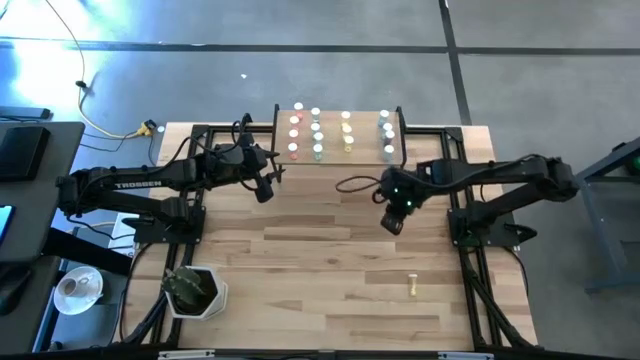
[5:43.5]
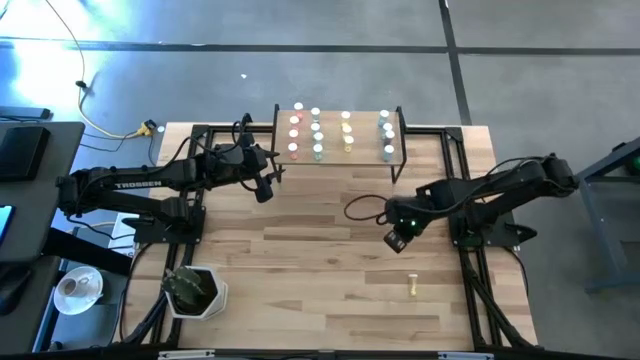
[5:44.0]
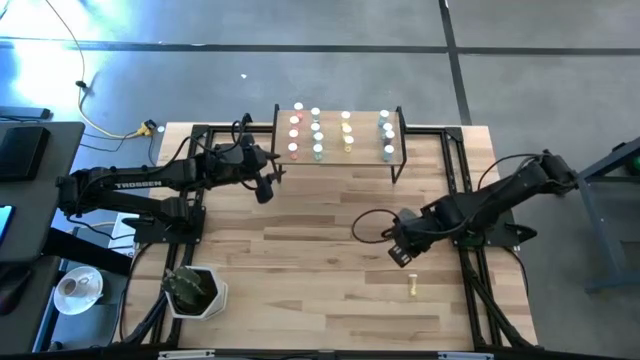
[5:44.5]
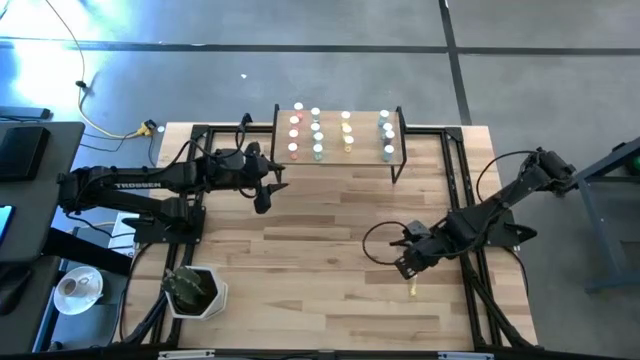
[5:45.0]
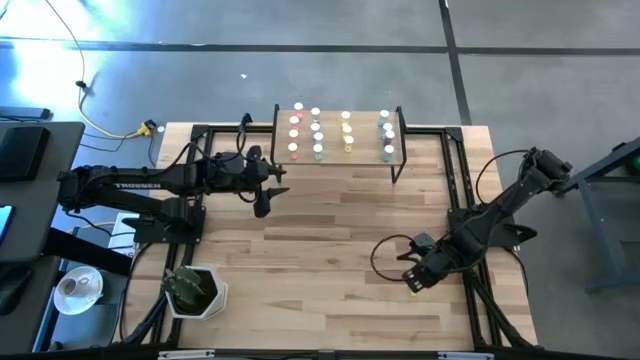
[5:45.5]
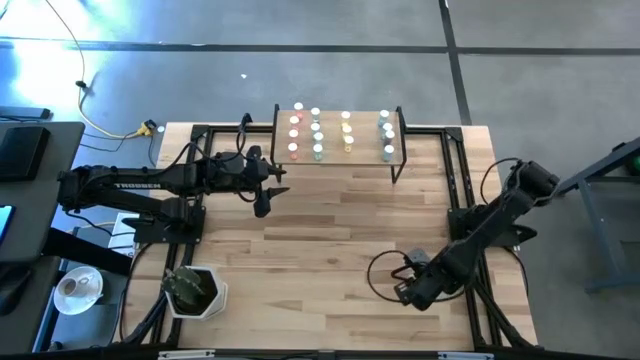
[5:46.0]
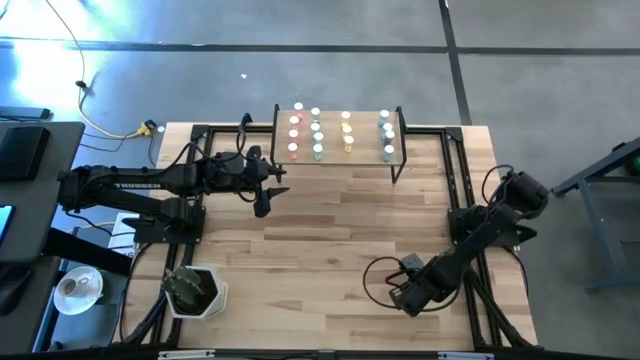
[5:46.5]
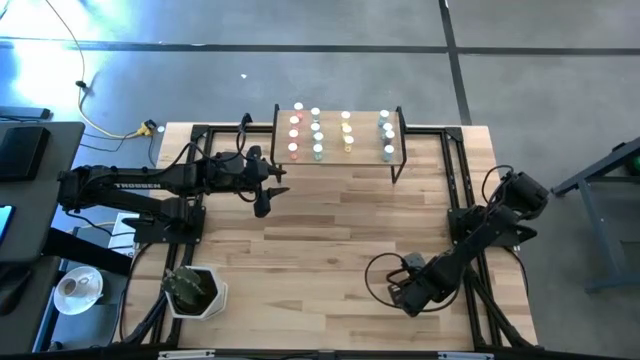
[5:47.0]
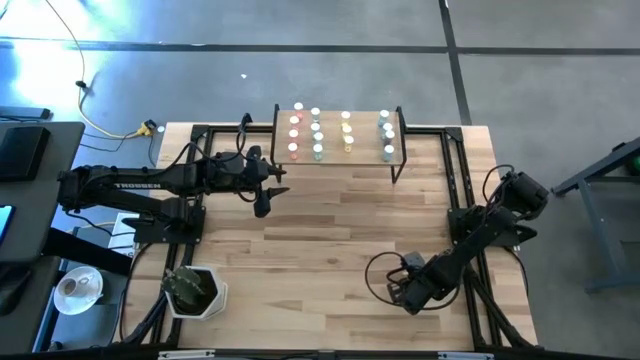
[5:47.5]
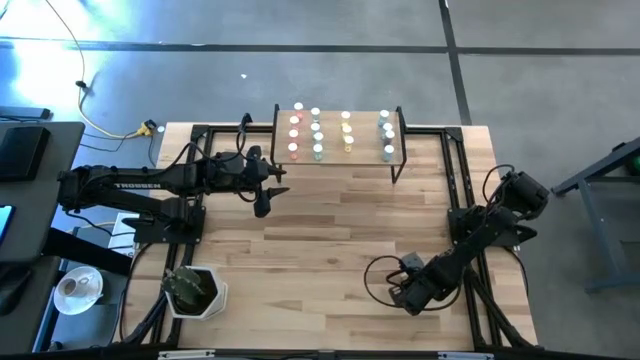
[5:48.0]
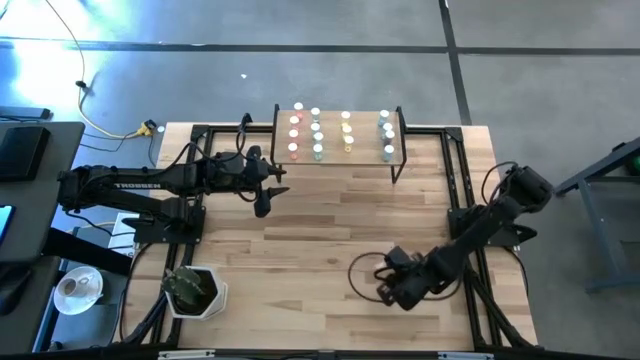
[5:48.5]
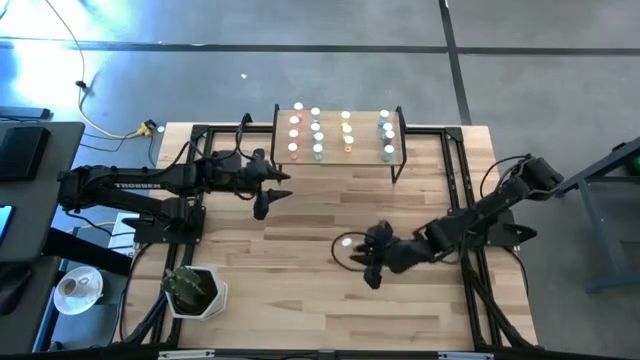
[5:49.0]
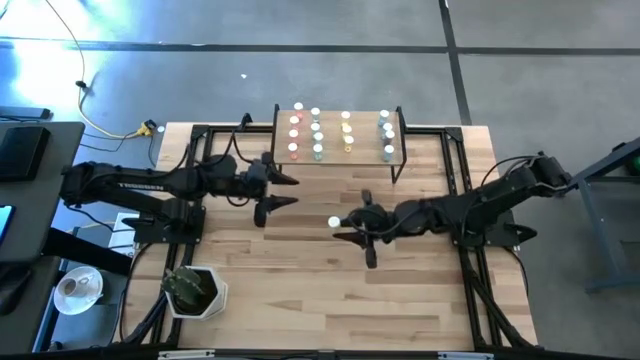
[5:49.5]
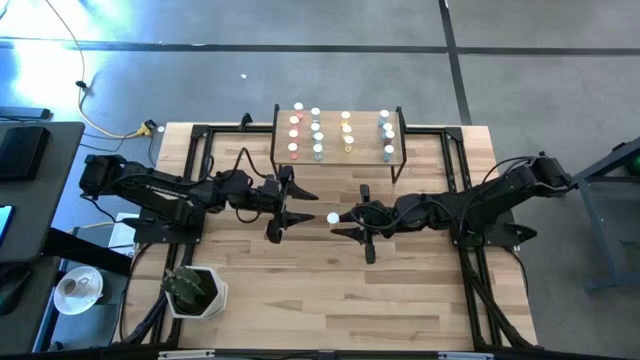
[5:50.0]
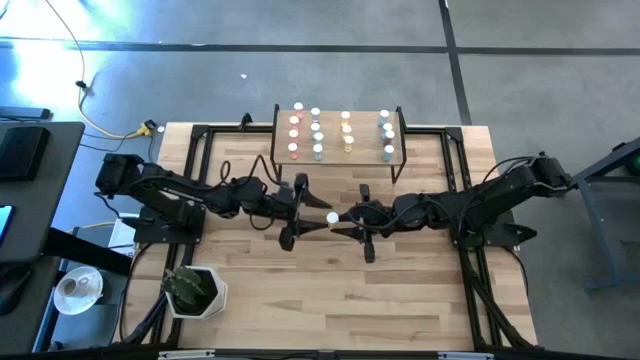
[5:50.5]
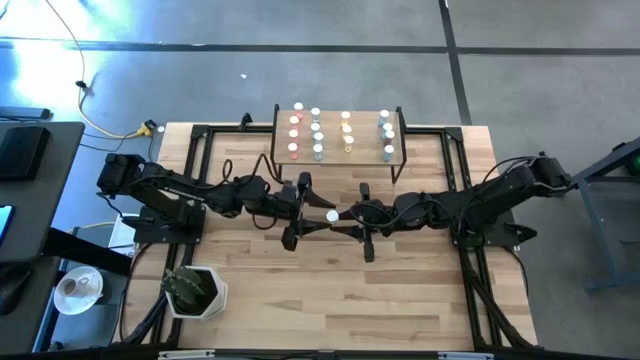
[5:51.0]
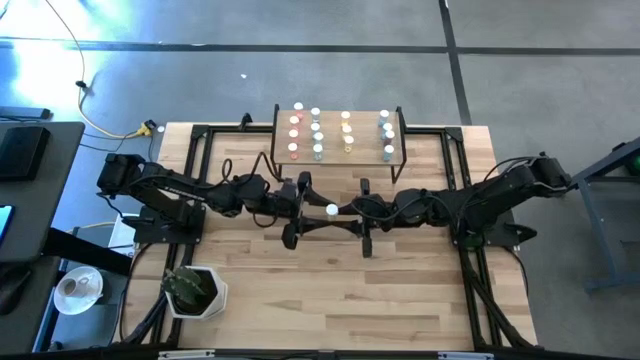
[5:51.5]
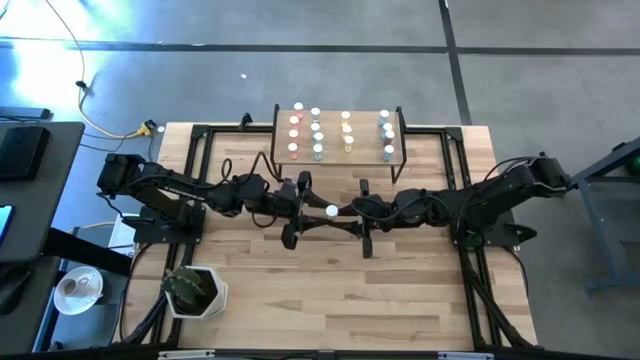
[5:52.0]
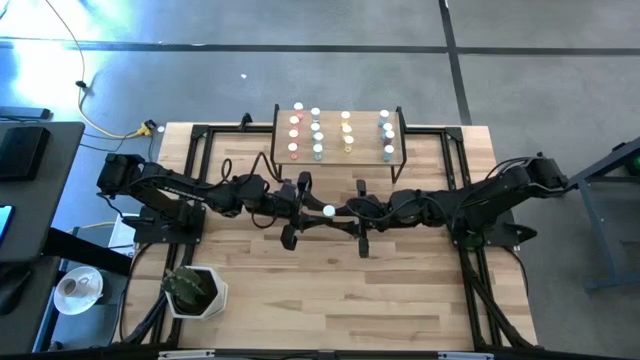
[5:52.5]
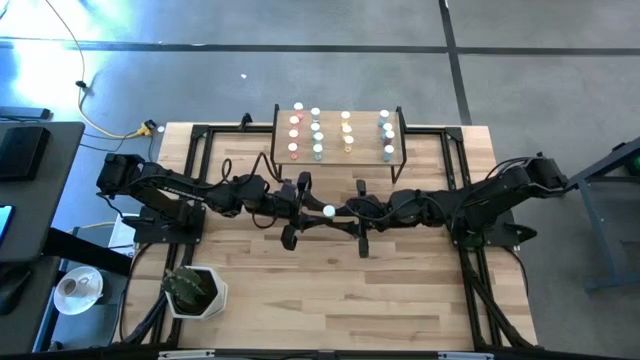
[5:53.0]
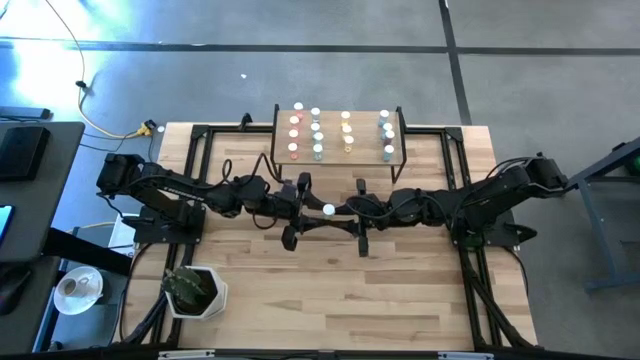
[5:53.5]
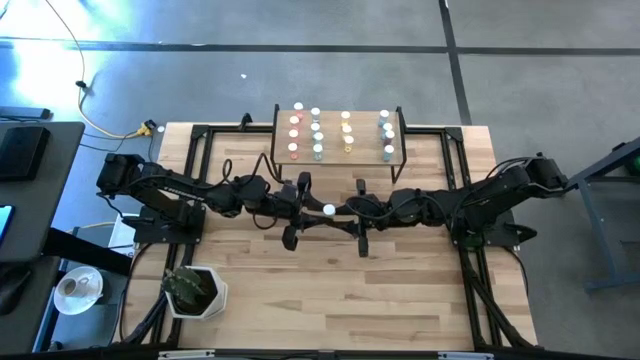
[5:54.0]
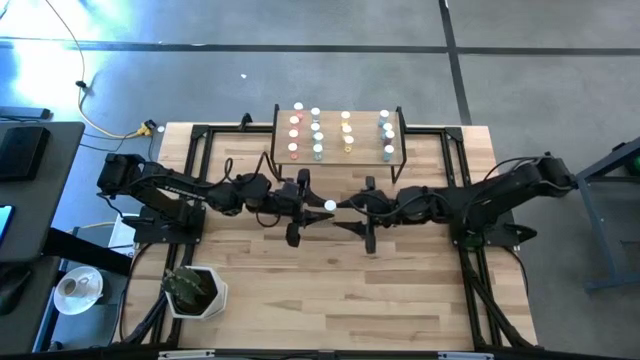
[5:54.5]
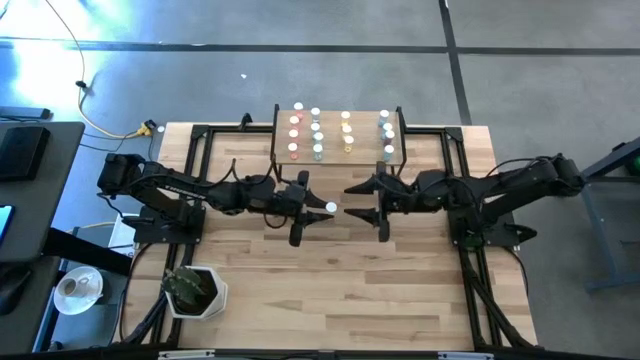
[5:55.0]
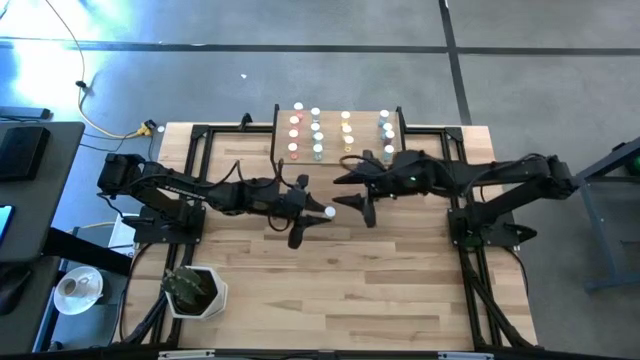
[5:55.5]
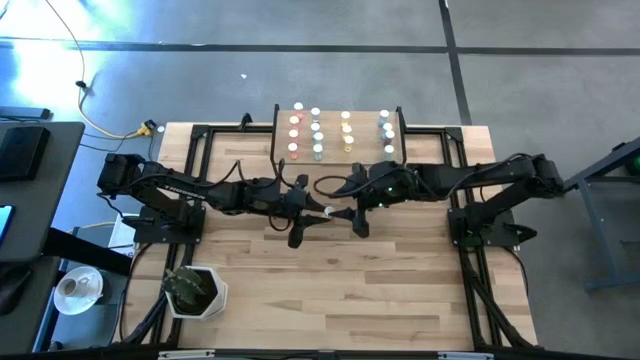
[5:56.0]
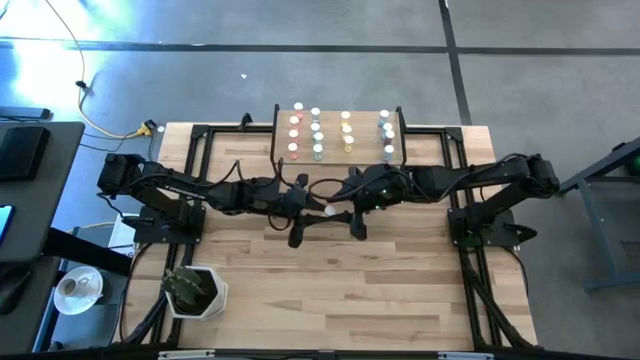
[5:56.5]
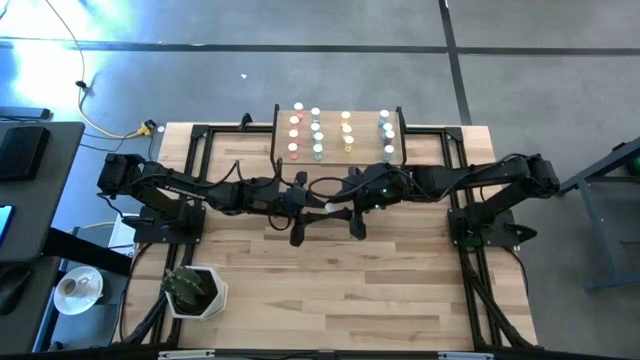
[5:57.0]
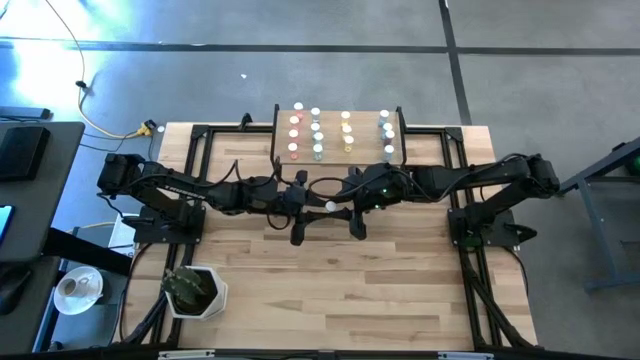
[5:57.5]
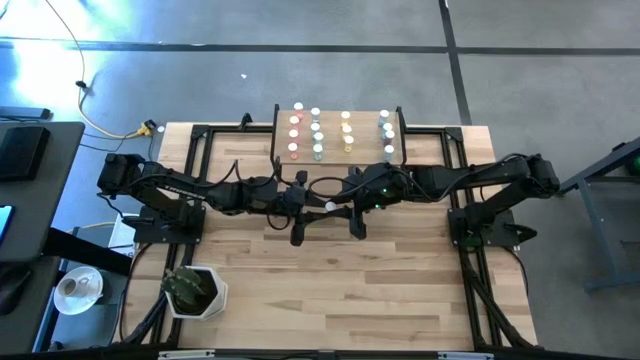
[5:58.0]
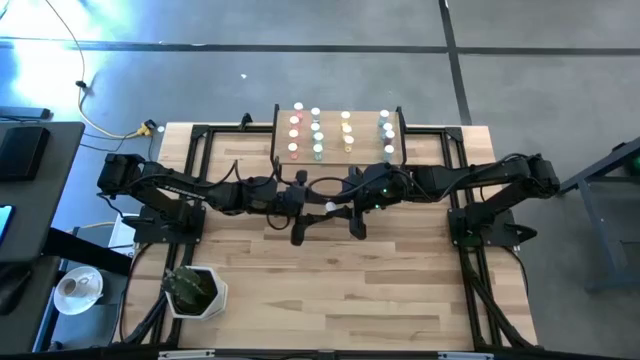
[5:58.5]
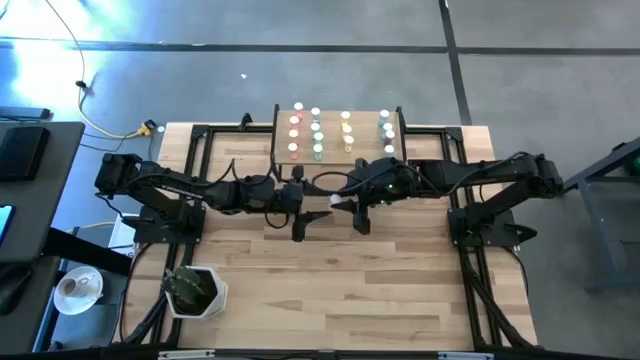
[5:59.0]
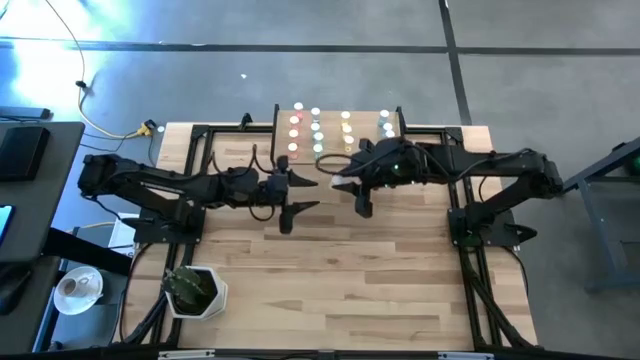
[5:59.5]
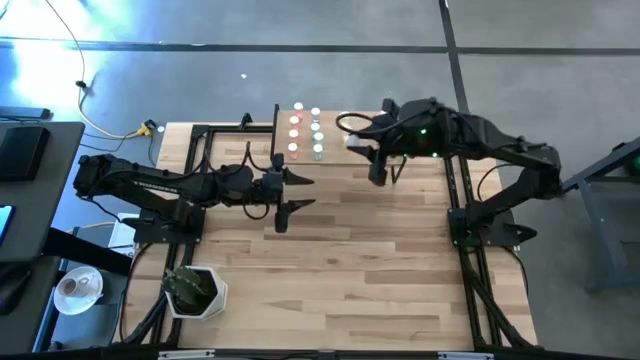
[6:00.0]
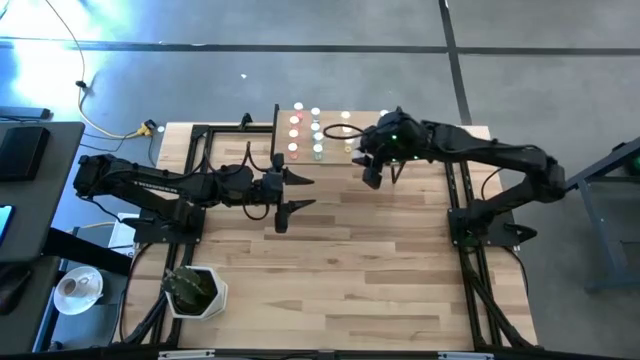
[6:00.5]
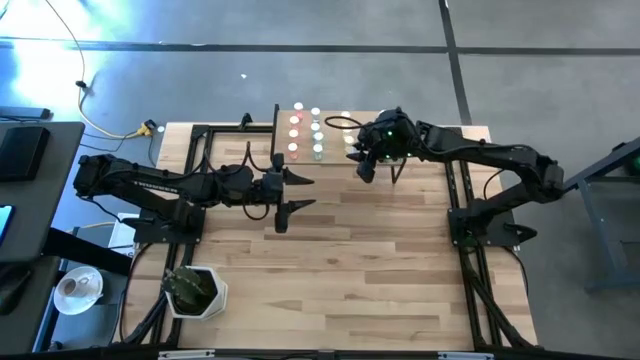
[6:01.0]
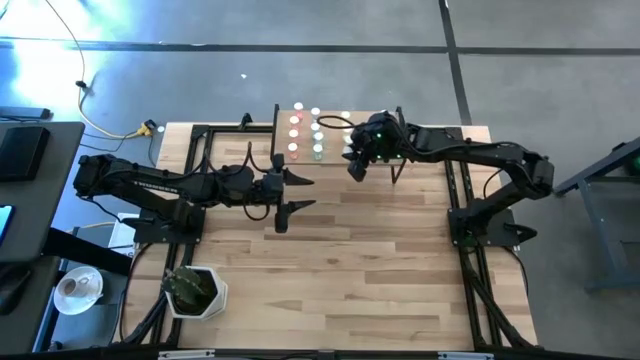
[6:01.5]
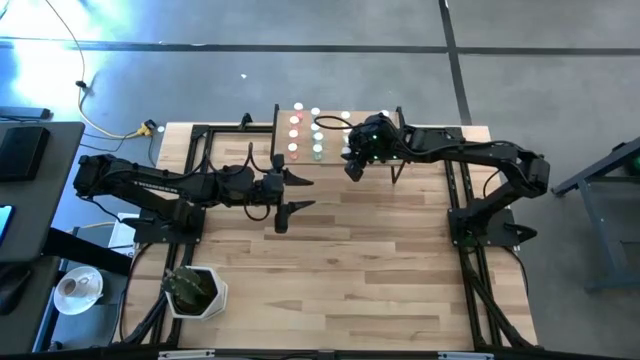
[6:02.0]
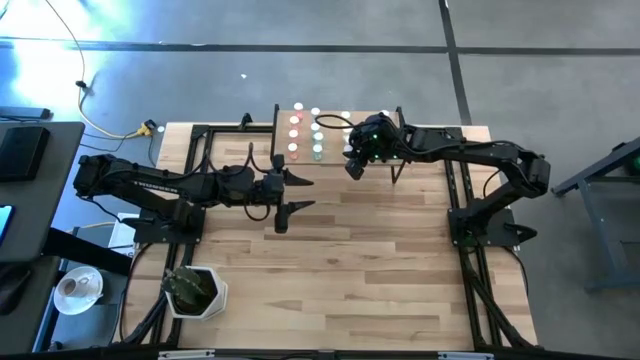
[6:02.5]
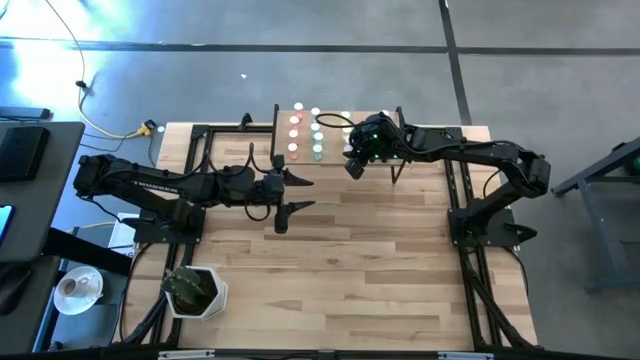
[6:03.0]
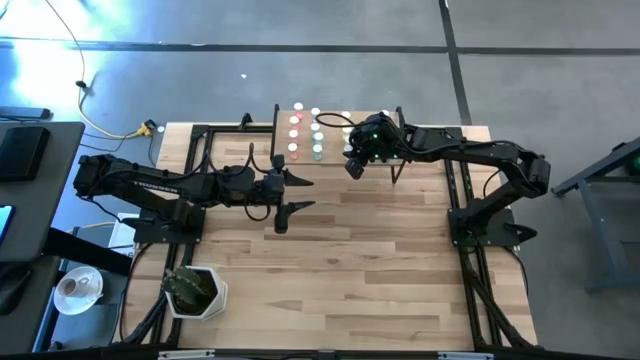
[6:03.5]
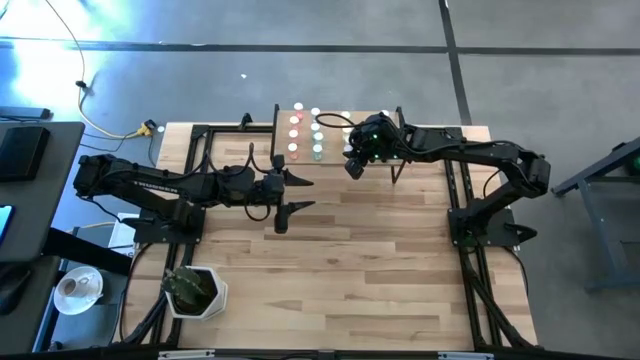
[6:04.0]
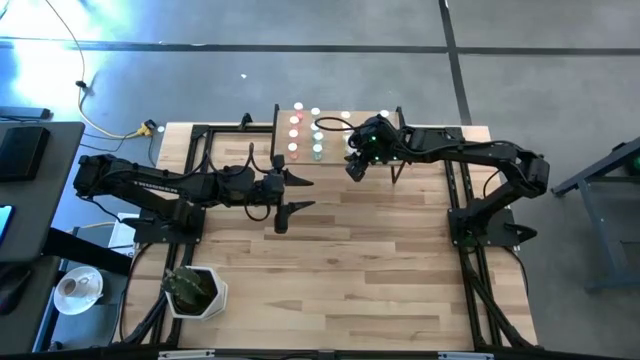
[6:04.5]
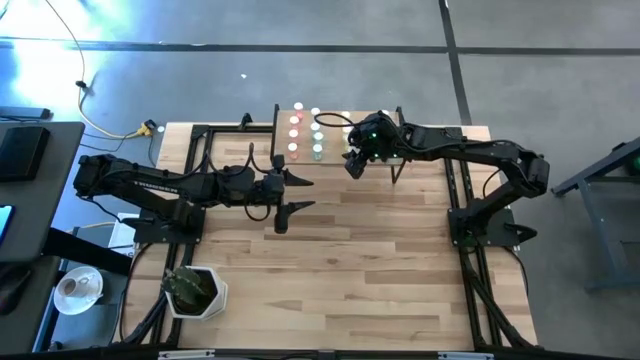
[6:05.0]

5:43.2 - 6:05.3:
Task: Pick and place medicine bottles onto shelf by color
Put the yellow medicine bottle on the shelf
